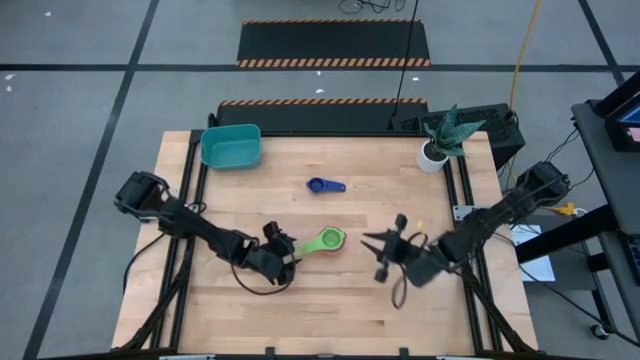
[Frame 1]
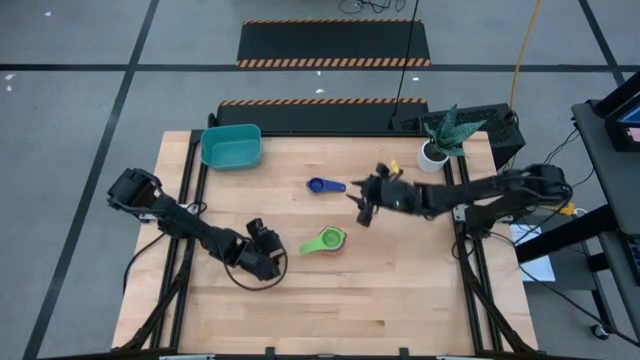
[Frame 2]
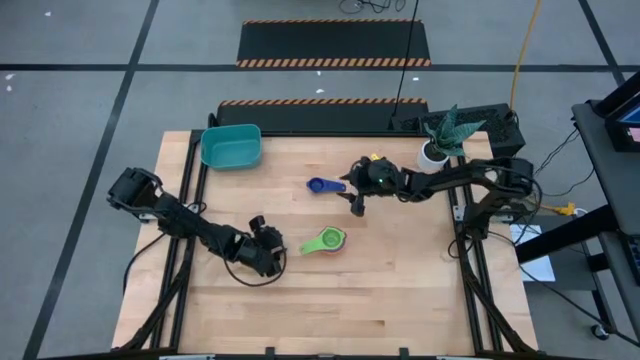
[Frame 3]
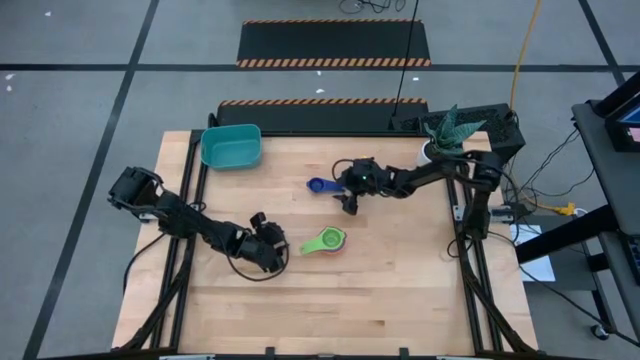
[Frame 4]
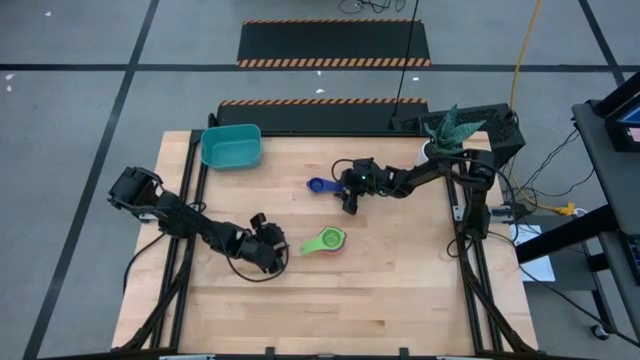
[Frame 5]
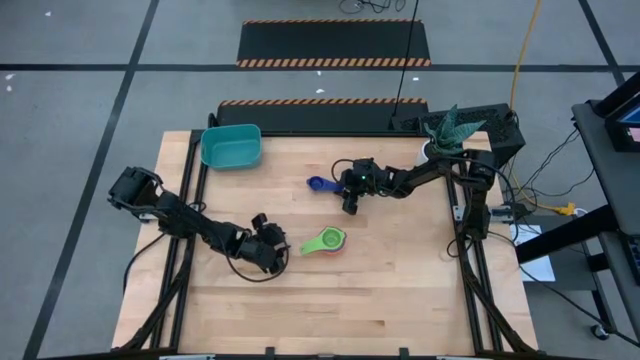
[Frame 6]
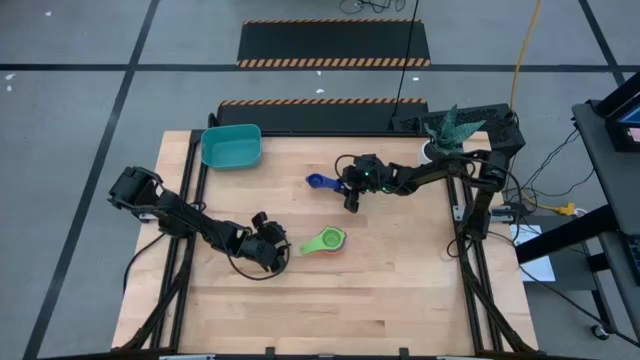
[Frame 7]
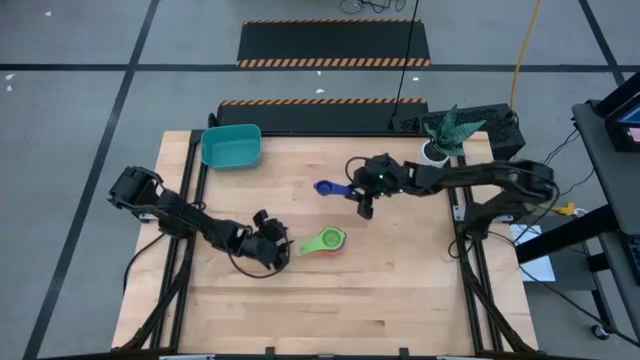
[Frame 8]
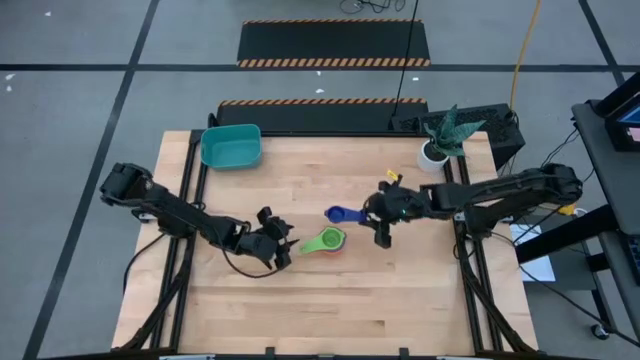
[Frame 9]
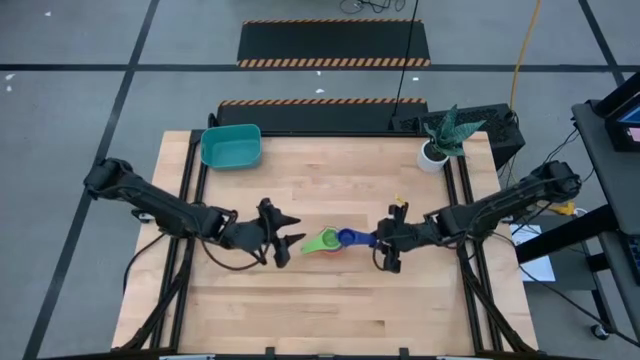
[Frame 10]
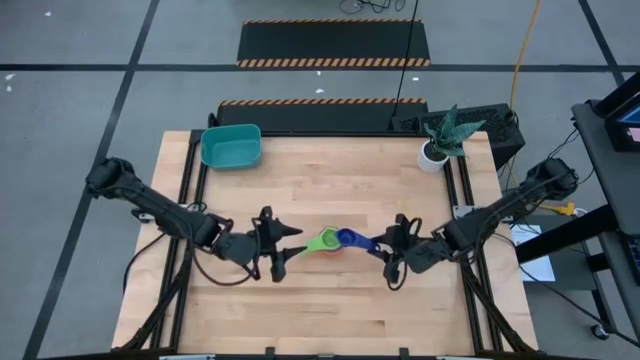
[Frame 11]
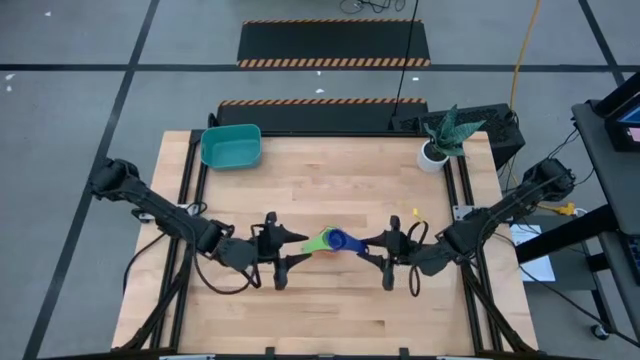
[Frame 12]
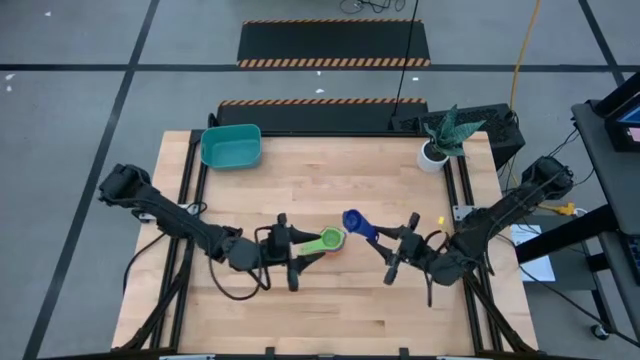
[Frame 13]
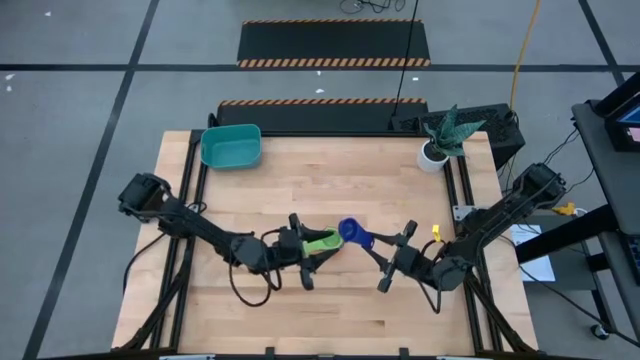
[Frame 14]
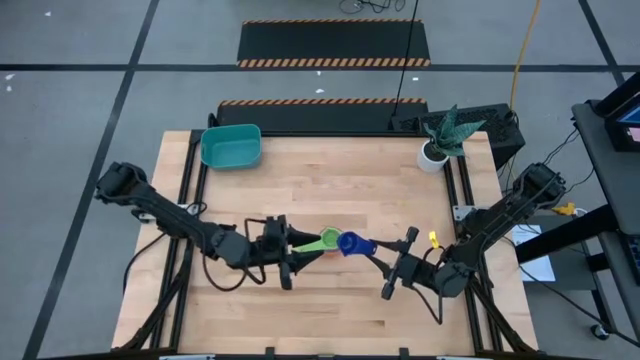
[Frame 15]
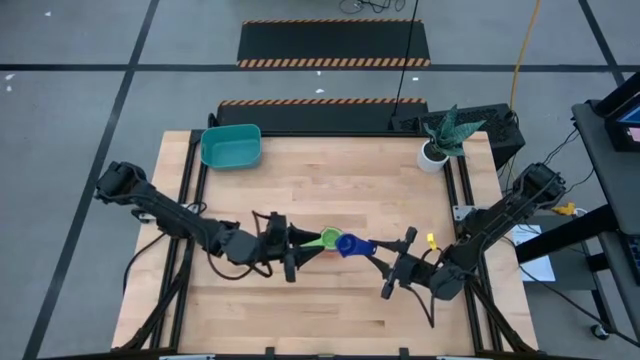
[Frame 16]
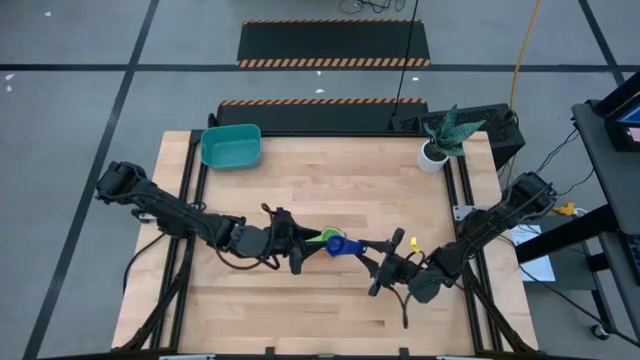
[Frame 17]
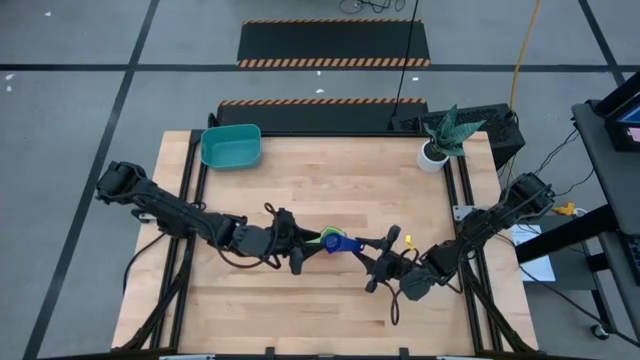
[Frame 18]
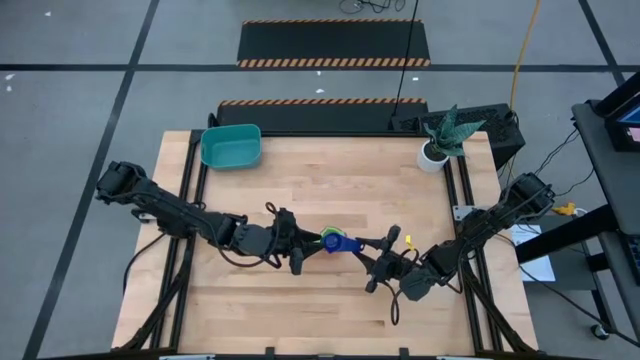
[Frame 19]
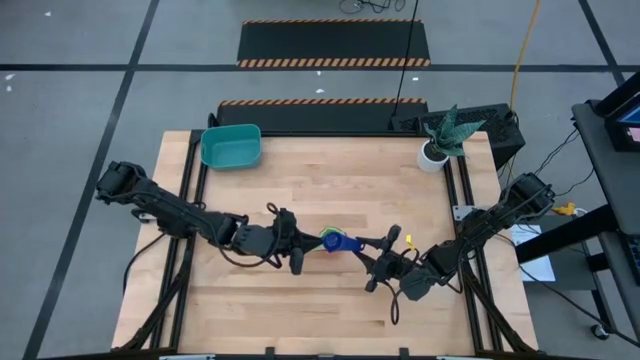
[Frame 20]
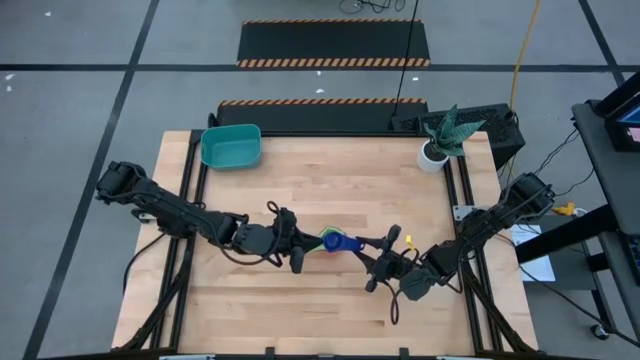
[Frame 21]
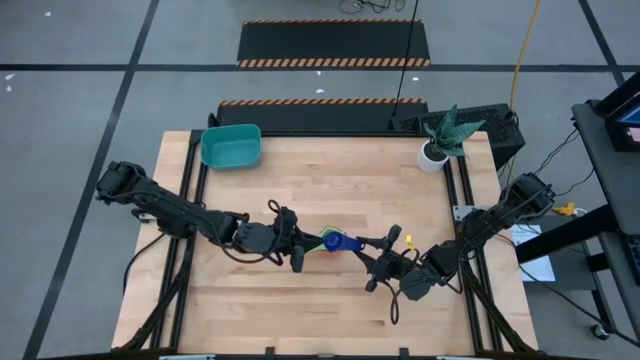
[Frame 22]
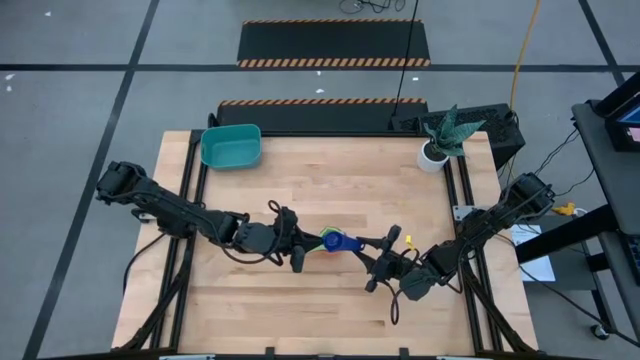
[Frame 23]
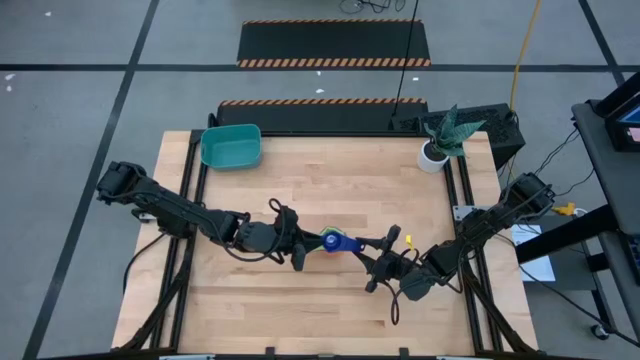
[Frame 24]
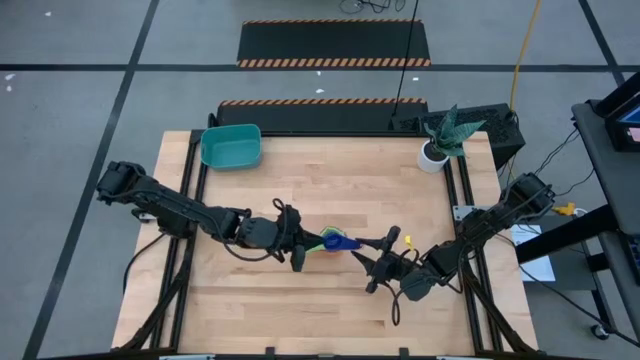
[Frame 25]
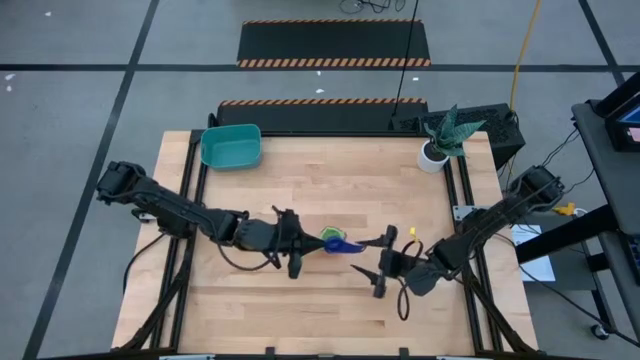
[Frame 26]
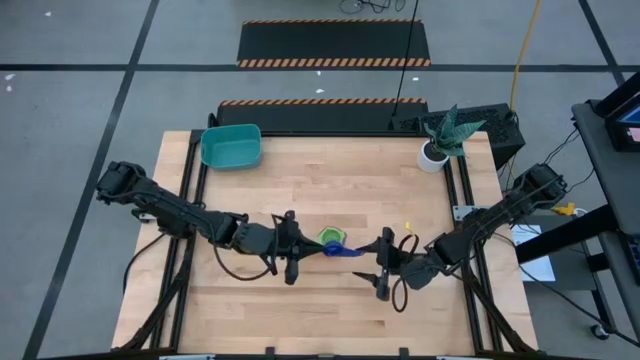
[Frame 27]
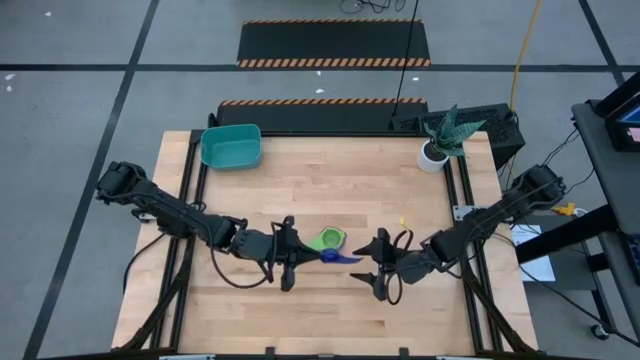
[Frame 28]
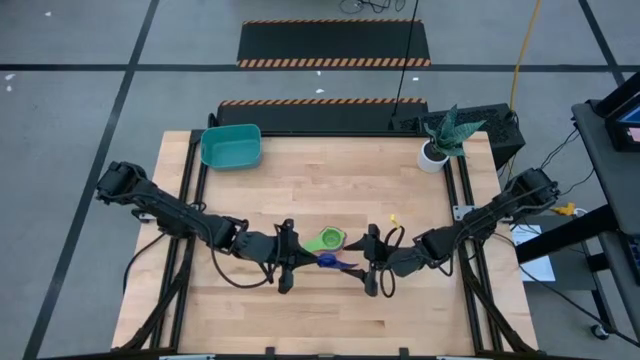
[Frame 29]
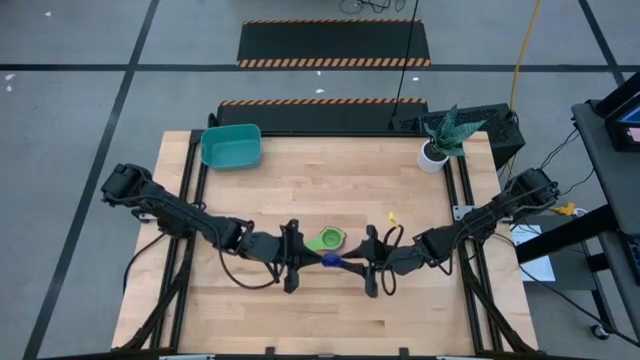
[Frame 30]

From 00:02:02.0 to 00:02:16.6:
Task: Nest measuring cups in basket
Stack the dark blue measuring cup on top of the green measuring cup

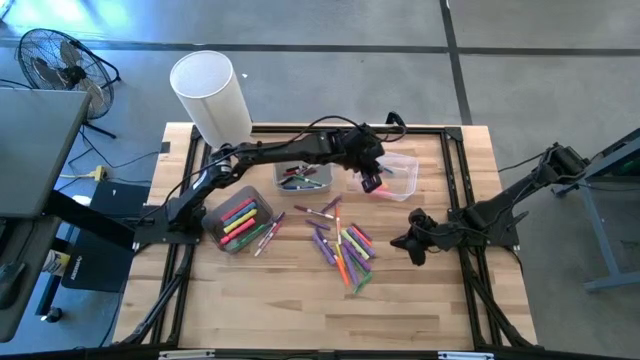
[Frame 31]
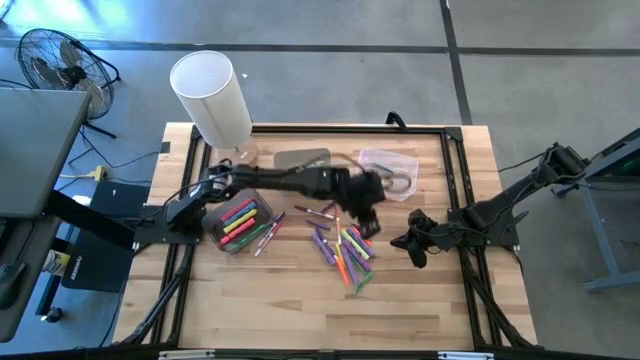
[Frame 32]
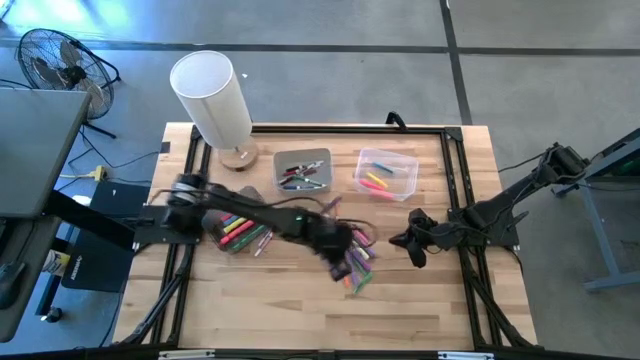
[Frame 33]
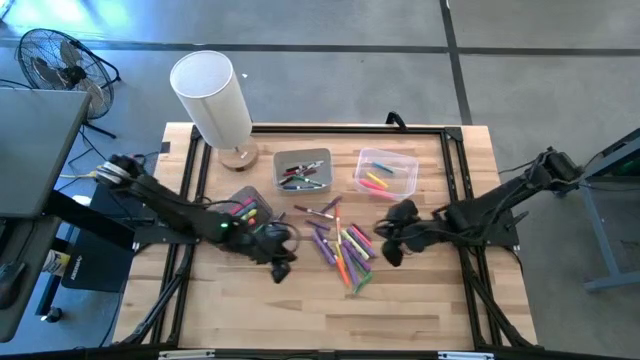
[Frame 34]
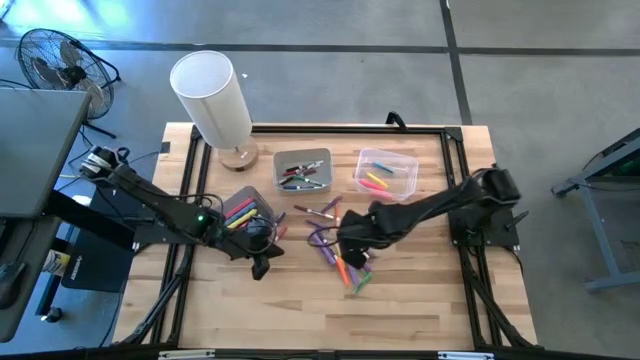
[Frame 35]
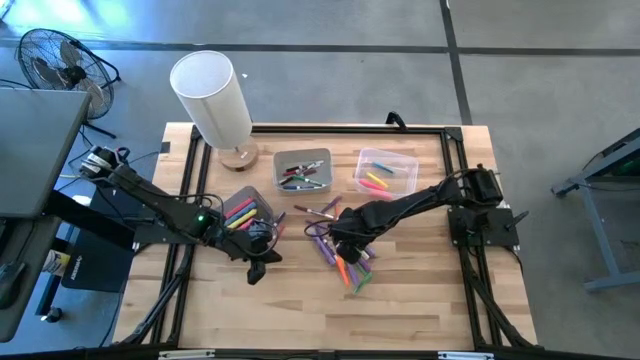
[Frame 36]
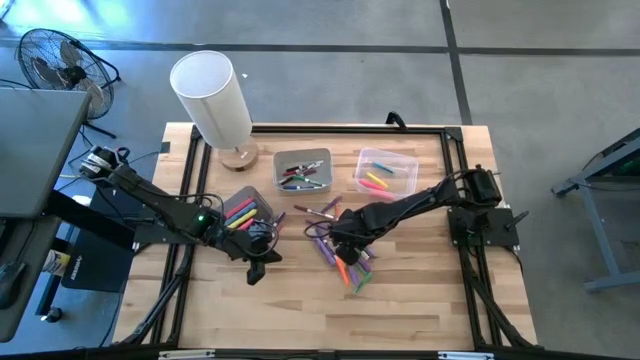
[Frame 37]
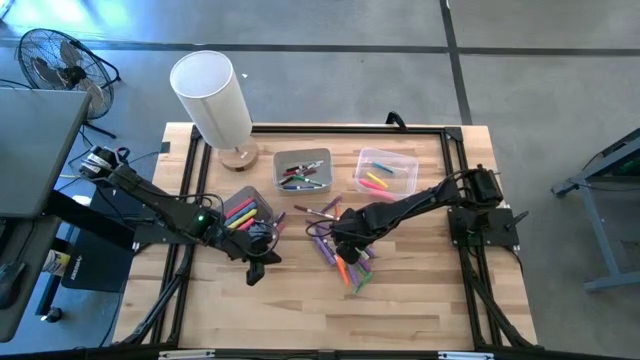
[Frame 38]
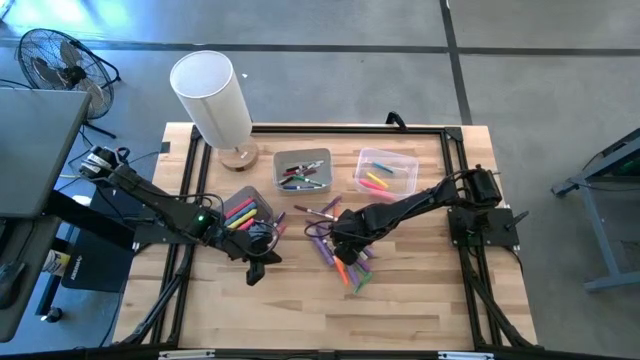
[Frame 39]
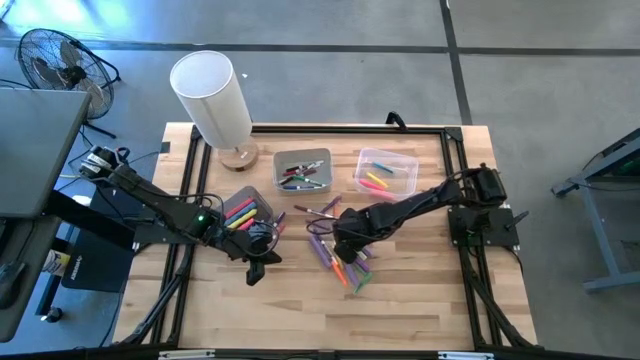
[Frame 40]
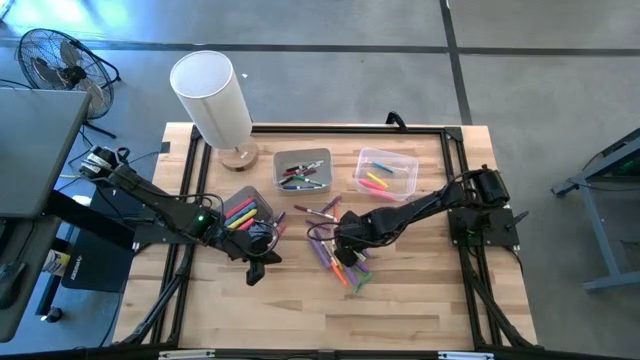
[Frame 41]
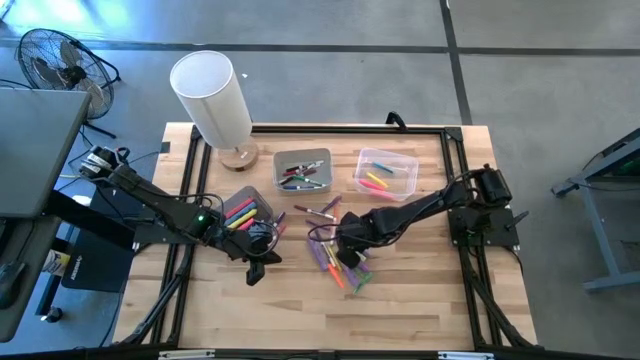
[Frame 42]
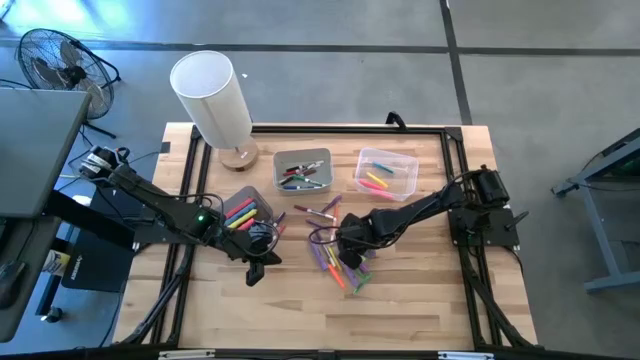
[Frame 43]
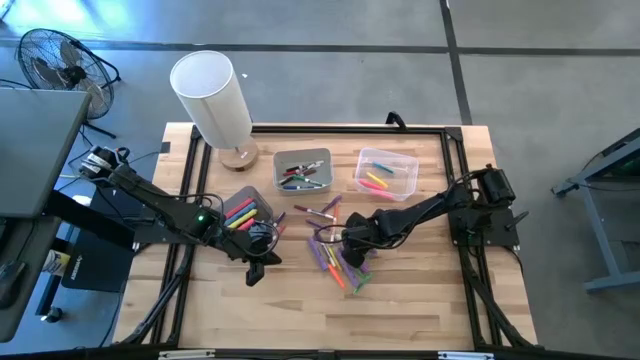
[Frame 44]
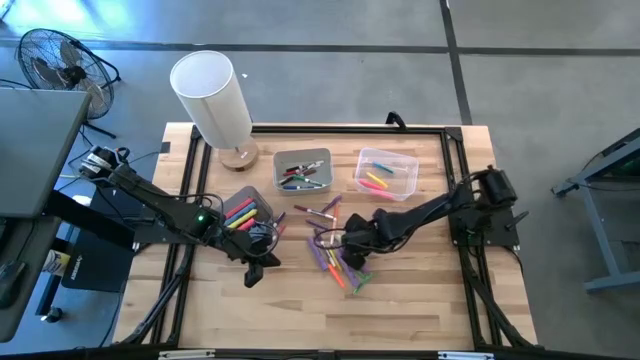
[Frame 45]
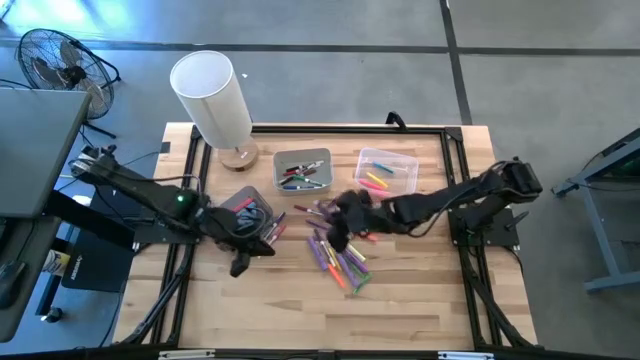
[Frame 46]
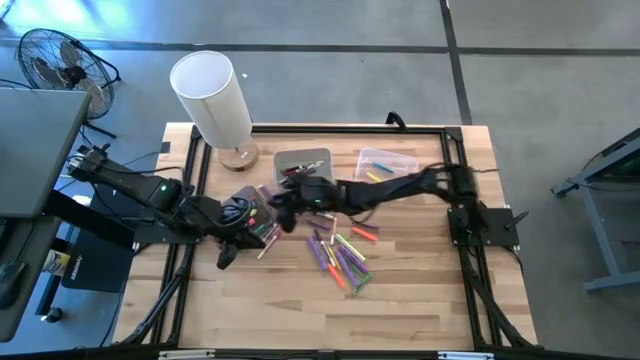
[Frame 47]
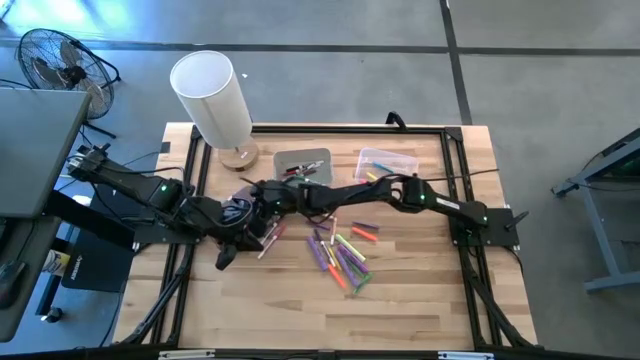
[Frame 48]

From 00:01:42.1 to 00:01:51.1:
Task: Pick & Place Markers
Put the purple highlighter pen into the black bin
